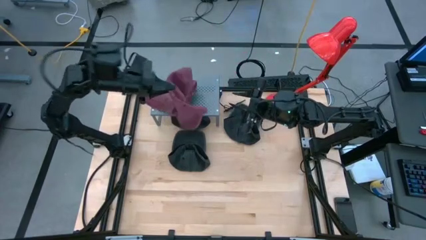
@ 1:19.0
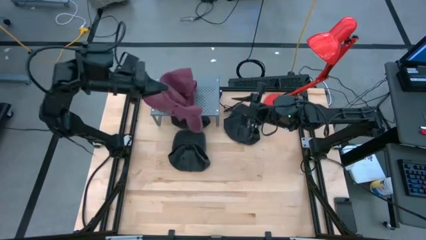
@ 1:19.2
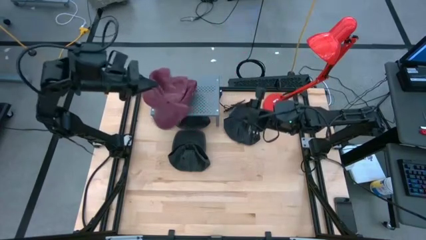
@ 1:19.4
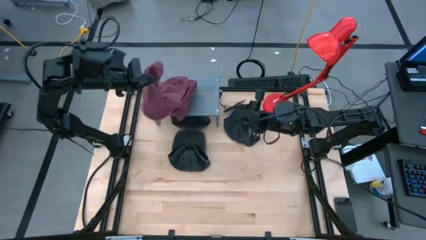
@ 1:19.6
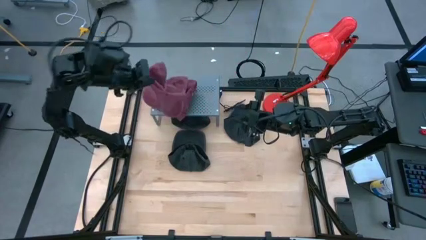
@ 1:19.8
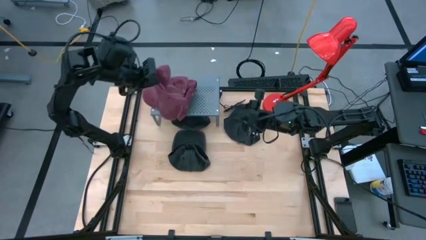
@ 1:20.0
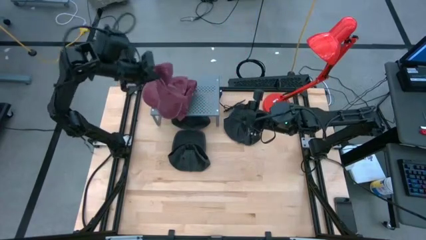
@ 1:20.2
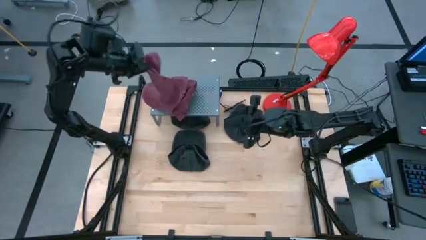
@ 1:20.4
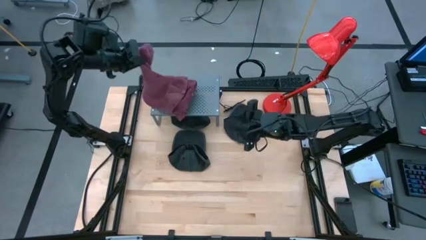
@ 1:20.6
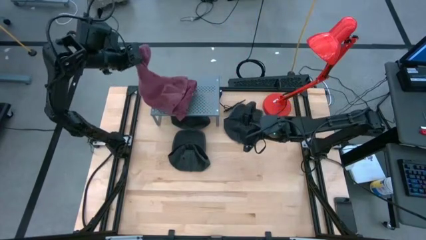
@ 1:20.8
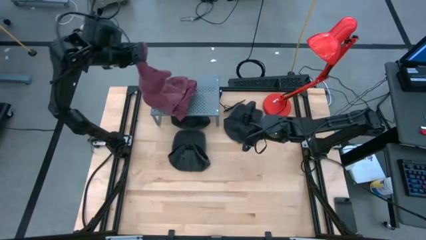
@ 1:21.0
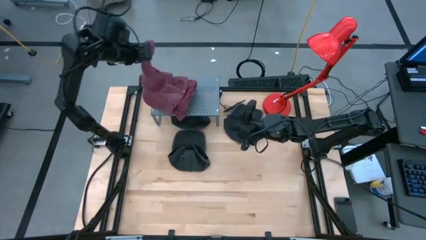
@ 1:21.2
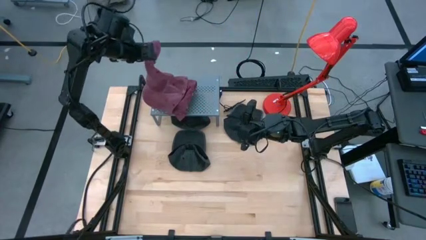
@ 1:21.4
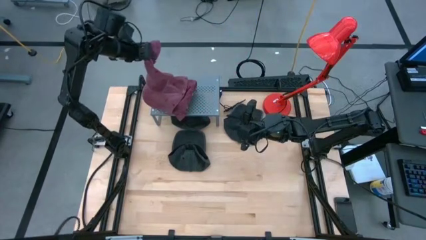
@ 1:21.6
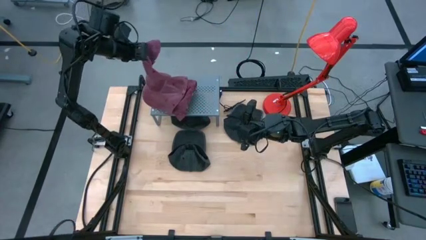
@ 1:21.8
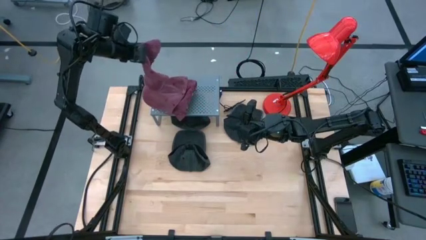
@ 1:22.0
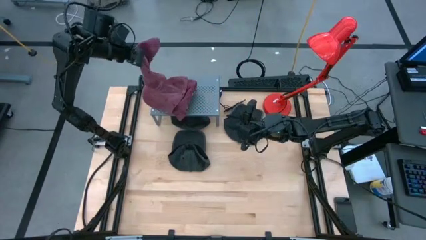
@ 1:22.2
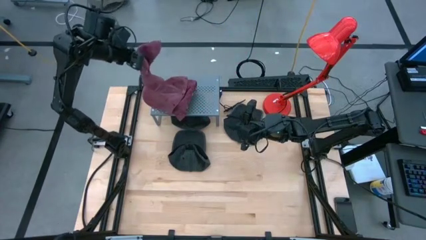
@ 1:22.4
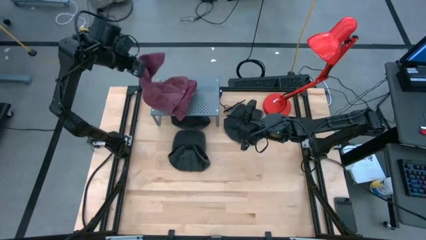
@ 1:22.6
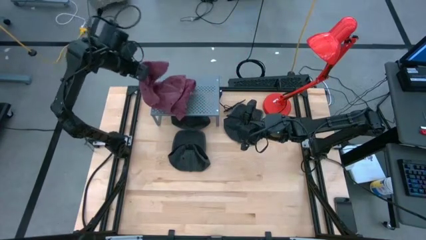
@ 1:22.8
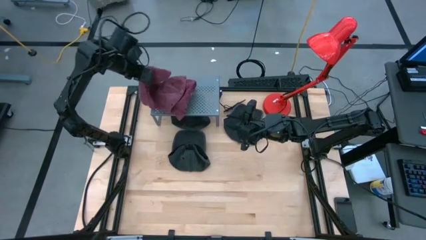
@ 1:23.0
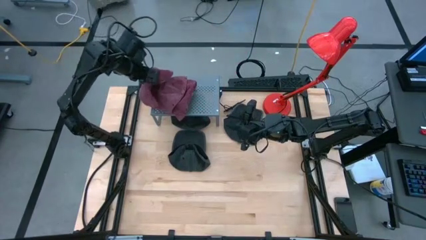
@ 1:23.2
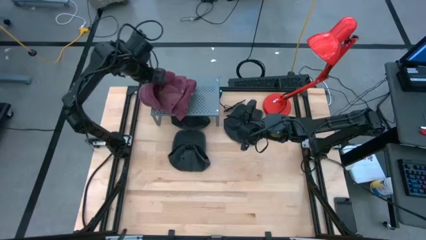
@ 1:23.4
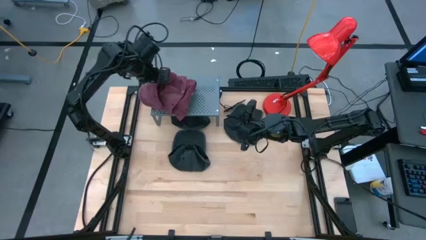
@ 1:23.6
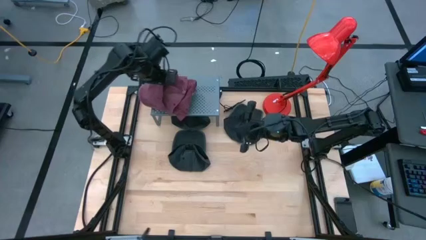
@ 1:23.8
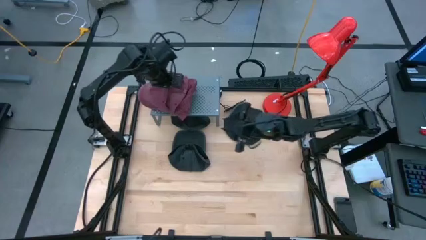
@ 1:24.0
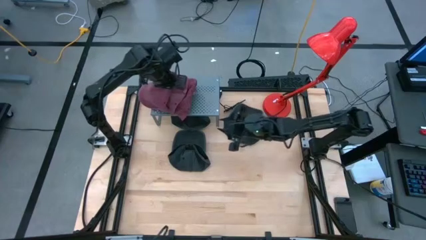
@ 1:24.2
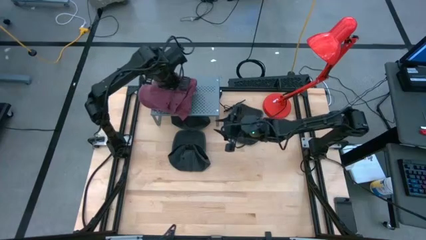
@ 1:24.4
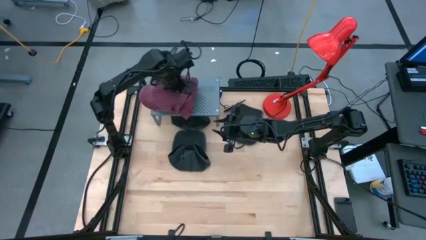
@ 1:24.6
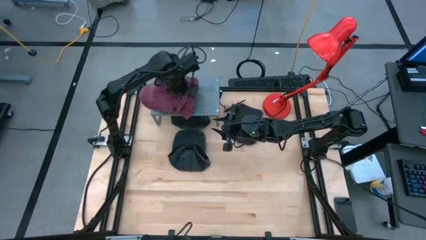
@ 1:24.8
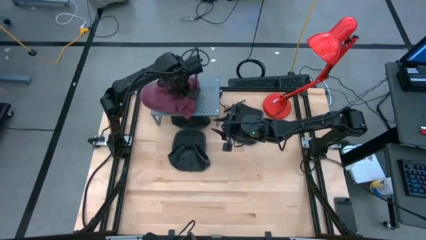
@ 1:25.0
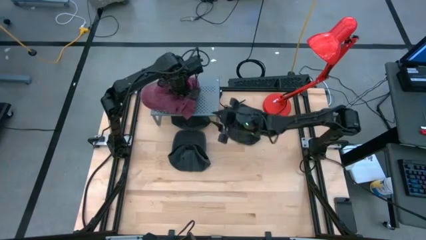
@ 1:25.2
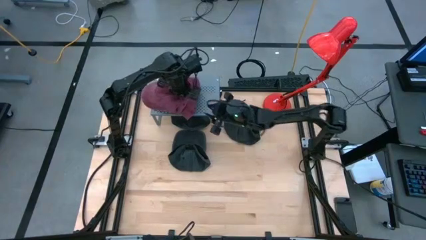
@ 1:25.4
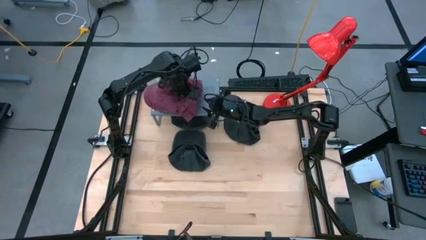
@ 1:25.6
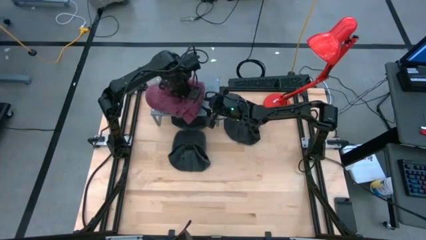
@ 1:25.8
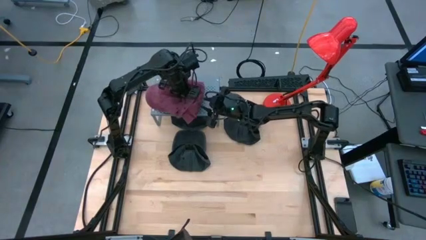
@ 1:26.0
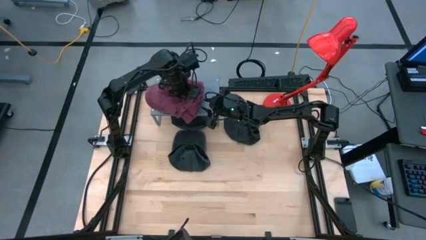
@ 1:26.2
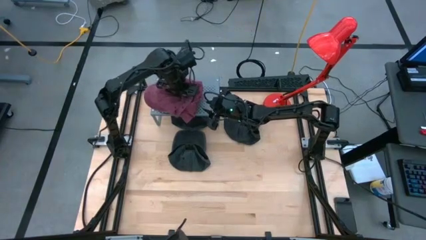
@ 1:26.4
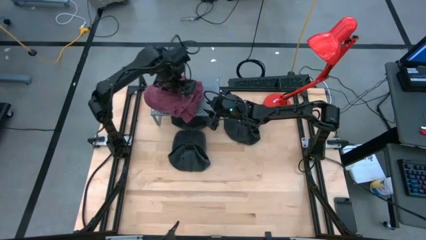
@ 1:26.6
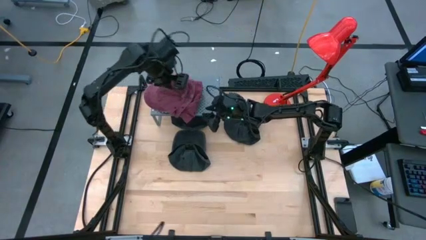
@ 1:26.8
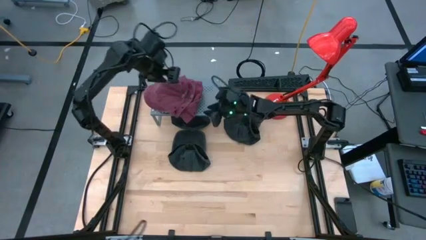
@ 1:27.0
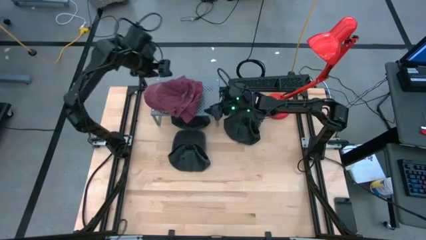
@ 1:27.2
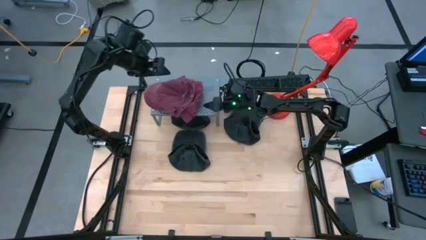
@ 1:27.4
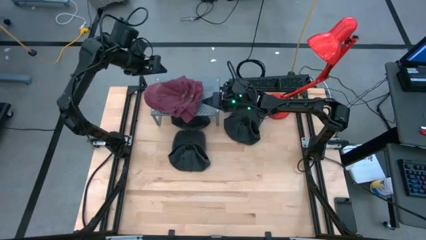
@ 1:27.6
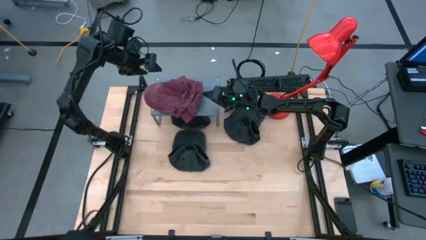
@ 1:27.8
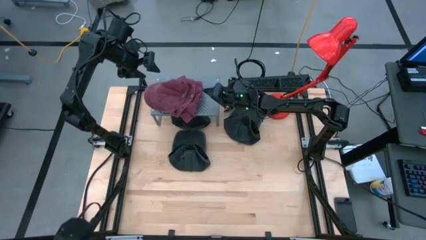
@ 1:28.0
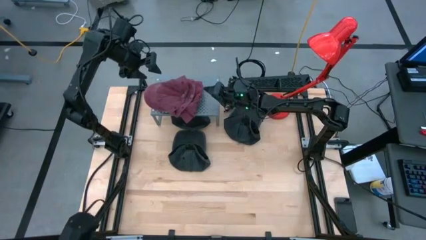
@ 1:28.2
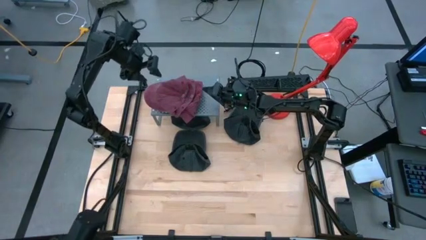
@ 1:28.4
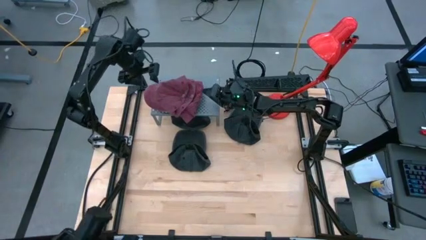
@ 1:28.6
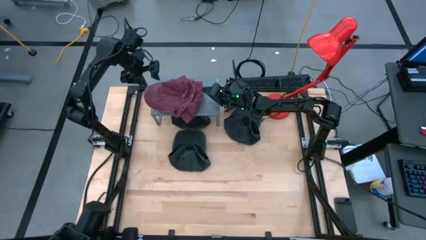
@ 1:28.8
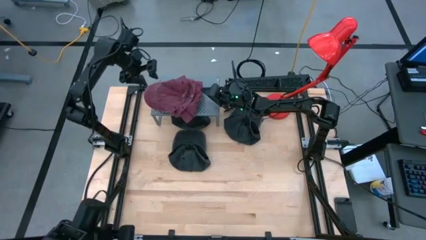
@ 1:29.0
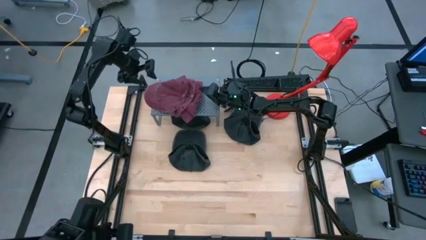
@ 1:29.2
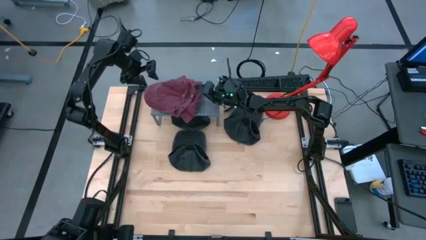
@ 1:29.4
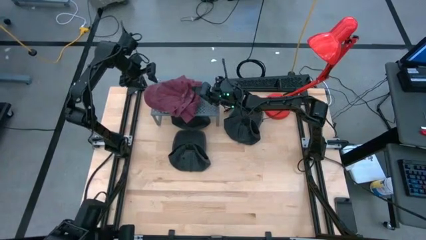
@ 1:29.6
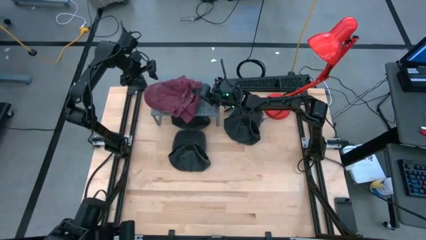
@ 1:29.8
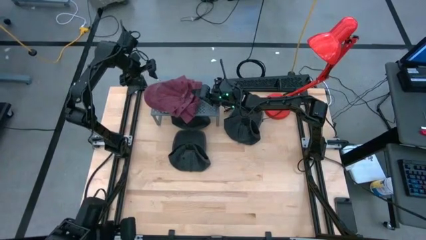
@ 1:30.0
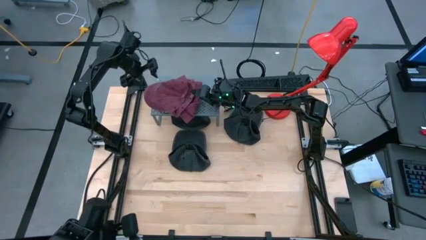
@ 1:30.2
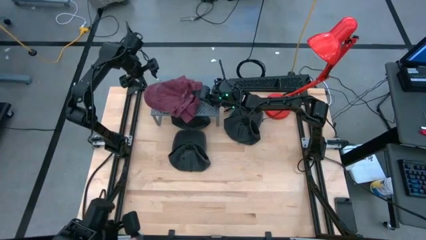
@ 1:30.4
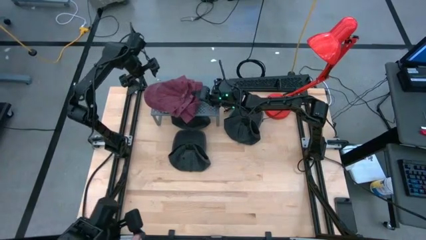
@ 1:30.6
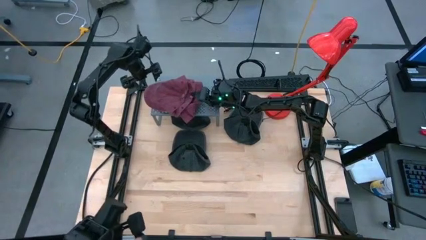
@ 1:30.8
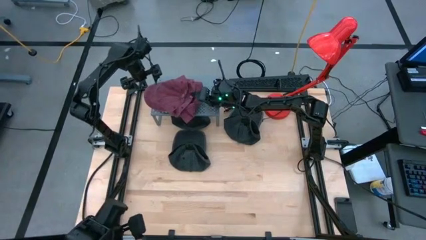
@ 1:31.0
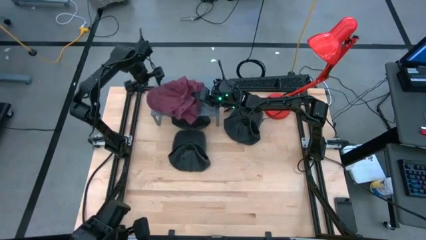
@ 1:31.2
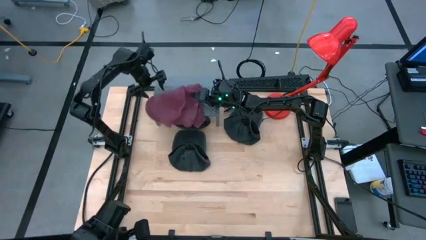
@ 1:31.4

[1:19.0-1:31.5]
Task: Pick & Place hat
Stack the red cap on top of the red cap on the shelf

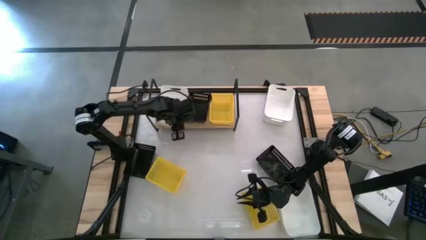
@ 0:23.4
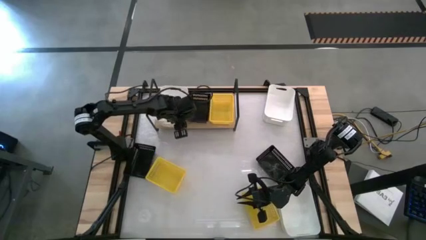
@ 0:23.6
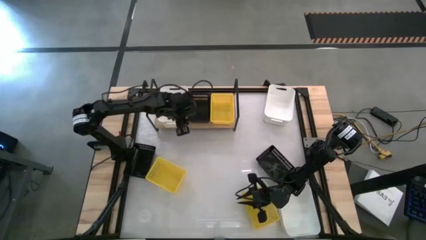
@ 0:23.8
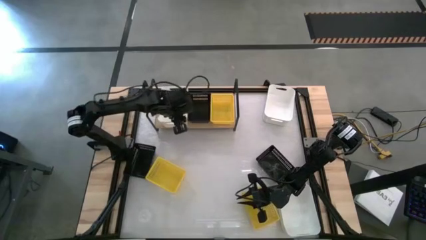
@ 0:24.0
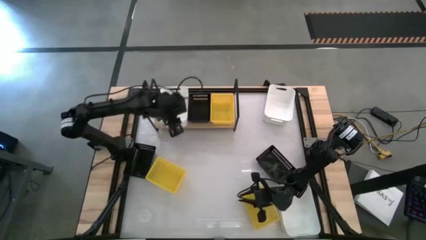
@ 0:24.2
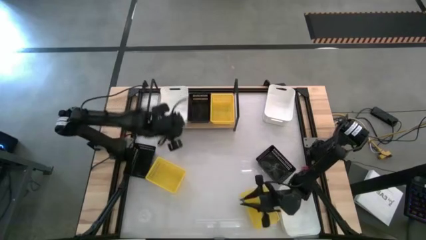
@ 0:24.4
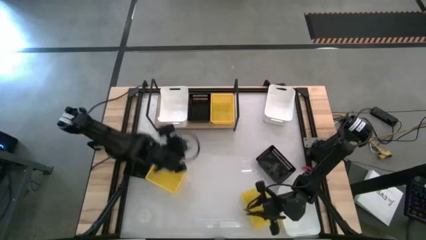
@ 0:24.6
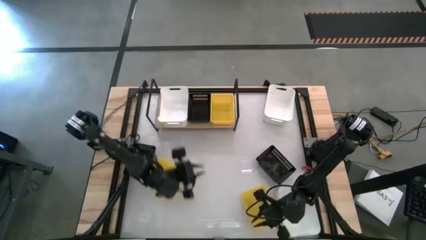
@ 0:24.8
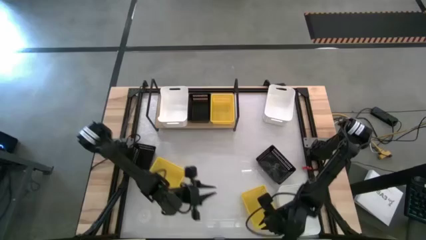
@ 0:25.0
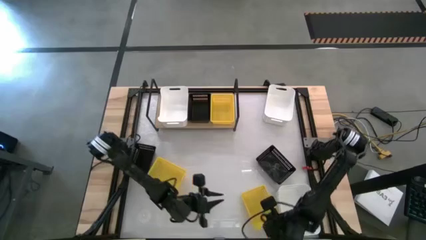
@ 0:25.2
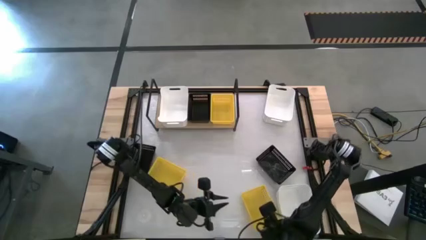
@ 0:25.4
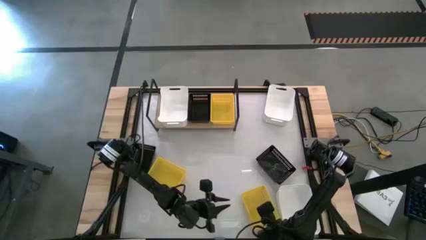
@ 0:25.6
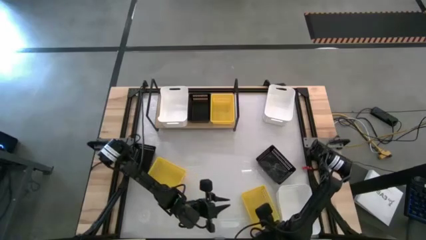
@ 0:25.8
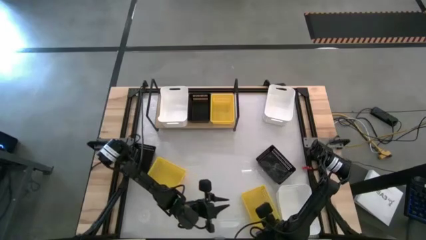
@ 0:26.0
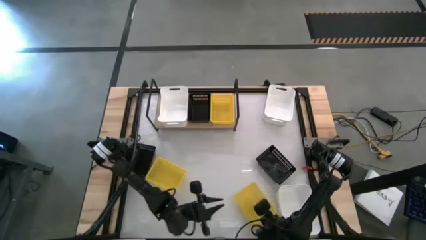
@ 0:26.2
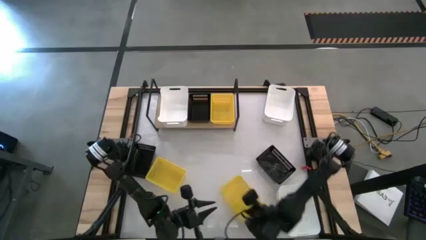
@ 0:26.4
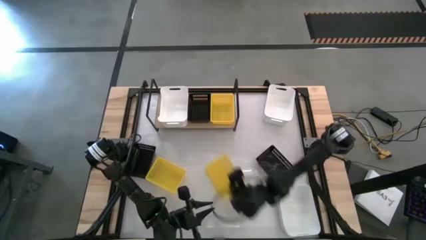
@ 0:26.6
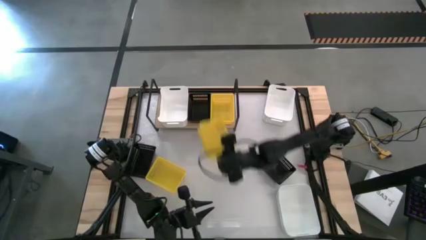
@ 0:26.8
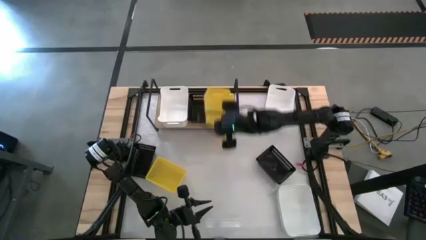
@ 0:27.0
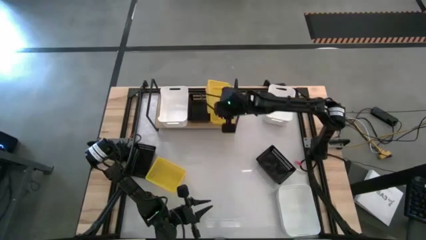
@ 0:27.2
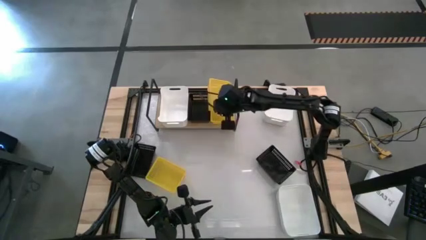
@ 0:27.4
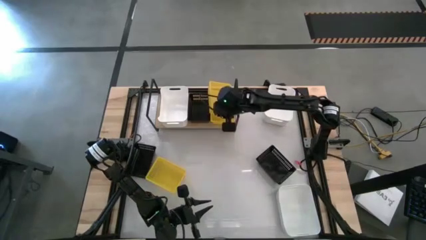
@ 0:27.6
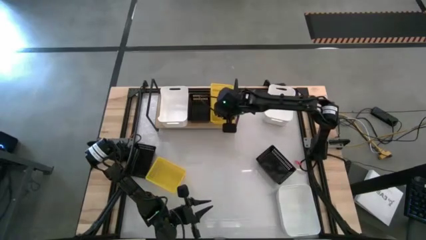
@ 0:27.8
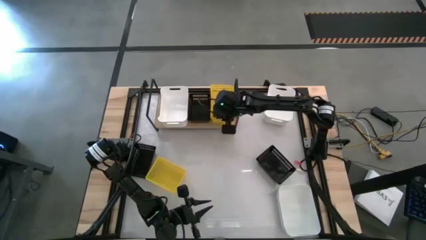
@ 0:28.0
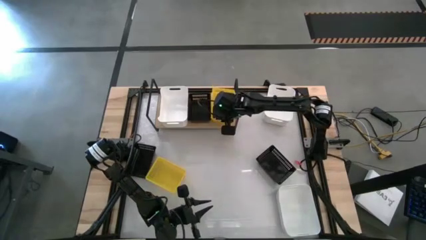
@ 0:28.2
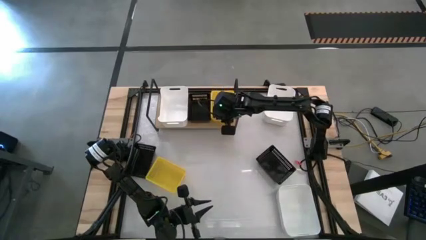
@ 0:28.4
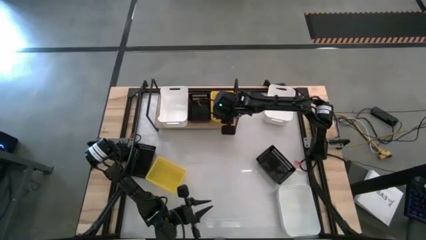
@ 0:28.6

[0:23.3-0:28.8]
Task: Stack baskets on shelf by color
Stack the right yellow bin on top of the yellow bin
